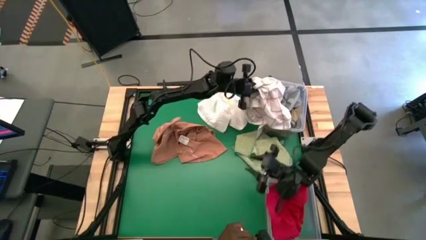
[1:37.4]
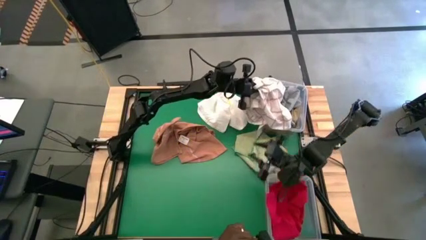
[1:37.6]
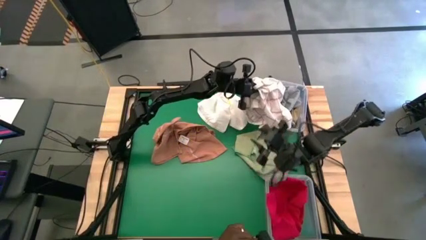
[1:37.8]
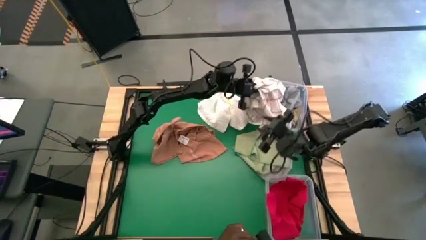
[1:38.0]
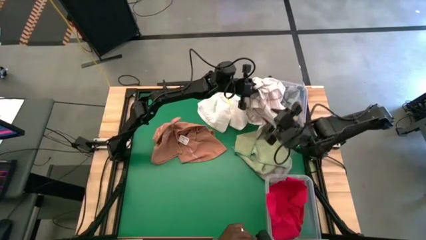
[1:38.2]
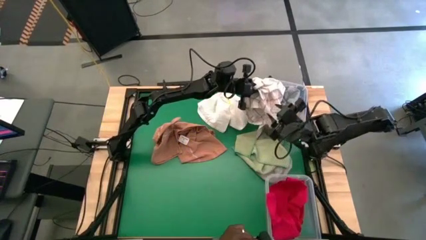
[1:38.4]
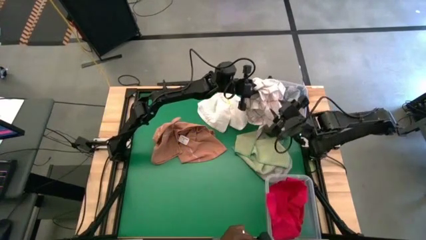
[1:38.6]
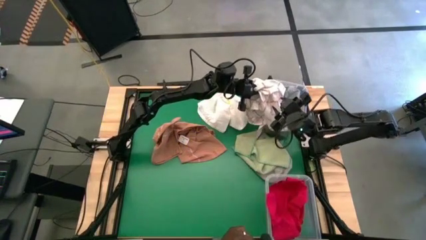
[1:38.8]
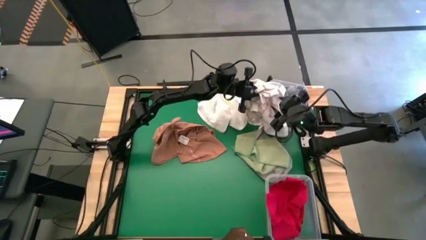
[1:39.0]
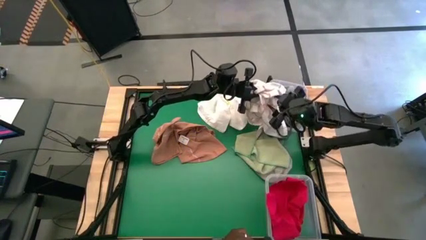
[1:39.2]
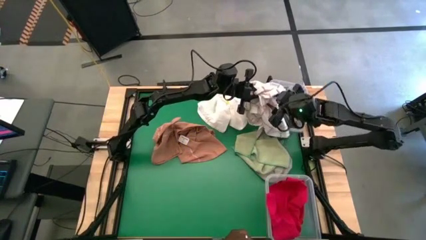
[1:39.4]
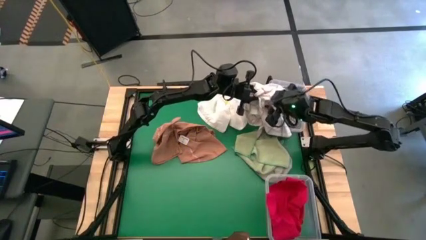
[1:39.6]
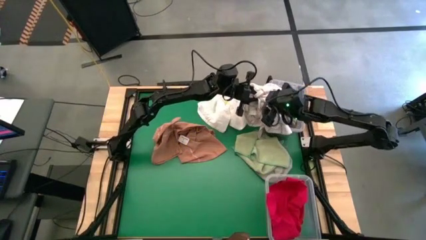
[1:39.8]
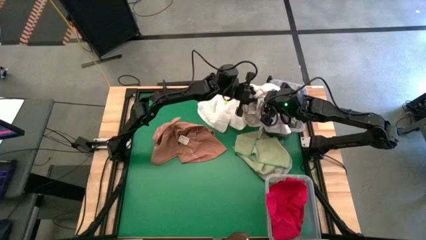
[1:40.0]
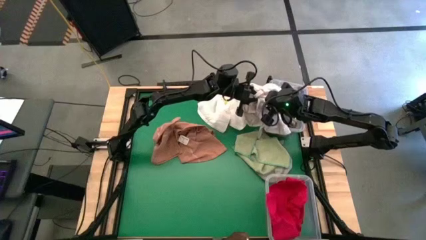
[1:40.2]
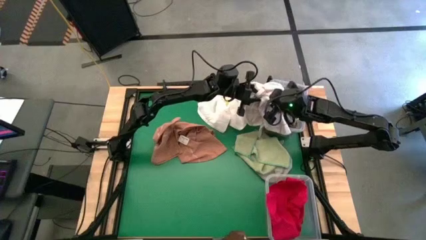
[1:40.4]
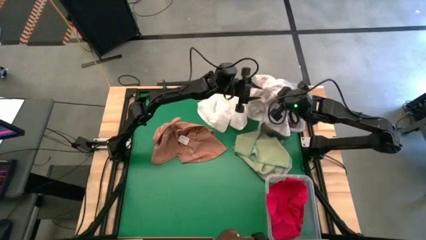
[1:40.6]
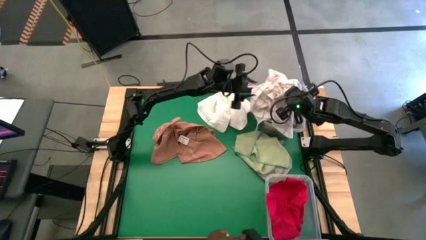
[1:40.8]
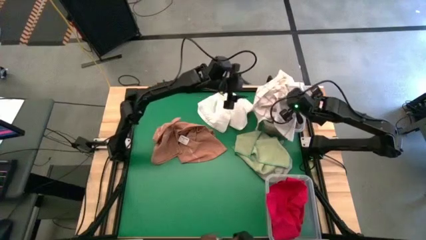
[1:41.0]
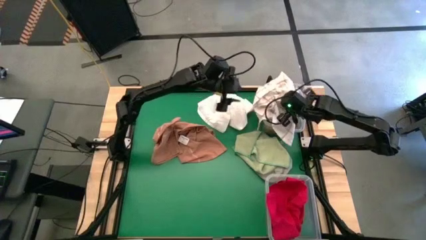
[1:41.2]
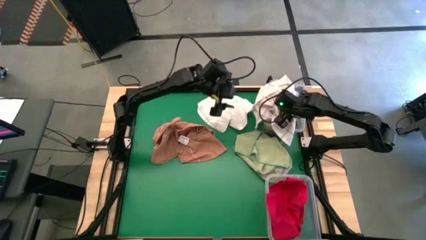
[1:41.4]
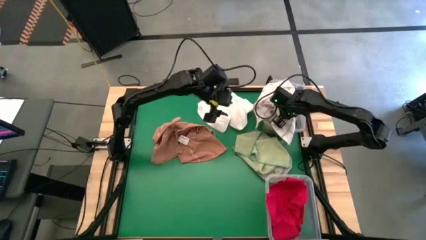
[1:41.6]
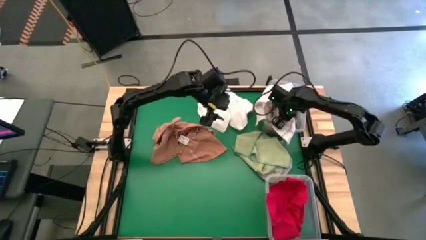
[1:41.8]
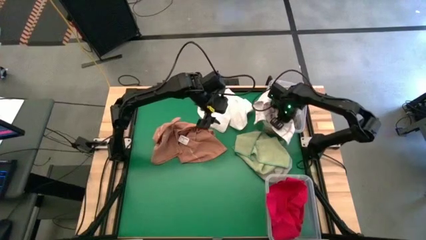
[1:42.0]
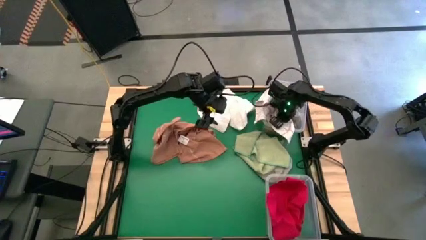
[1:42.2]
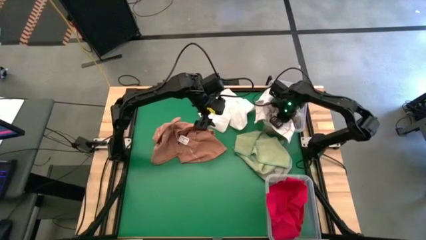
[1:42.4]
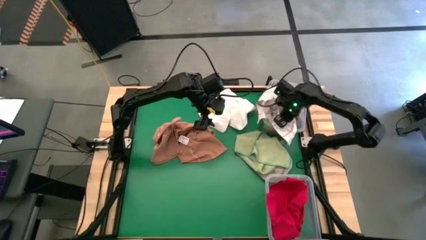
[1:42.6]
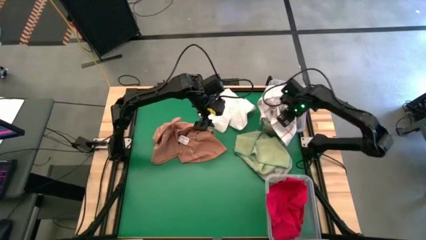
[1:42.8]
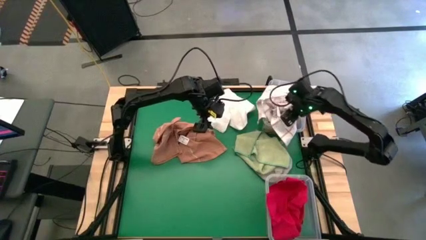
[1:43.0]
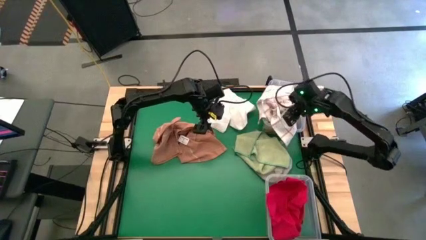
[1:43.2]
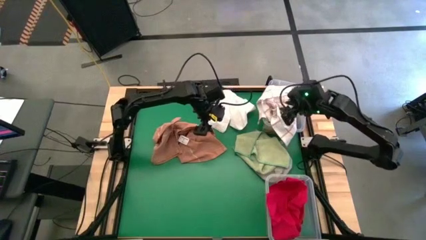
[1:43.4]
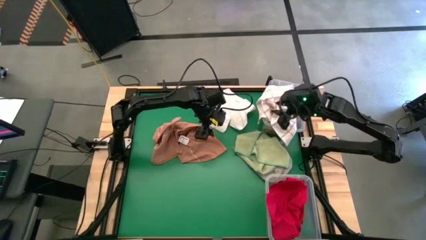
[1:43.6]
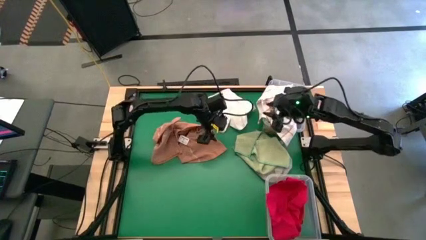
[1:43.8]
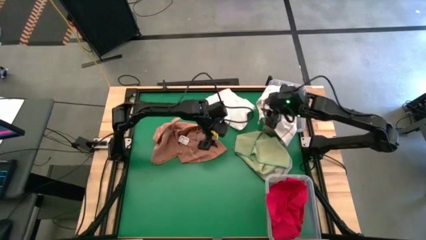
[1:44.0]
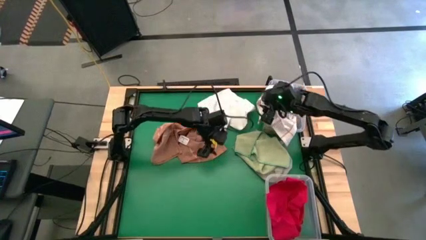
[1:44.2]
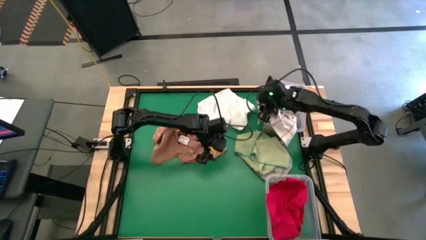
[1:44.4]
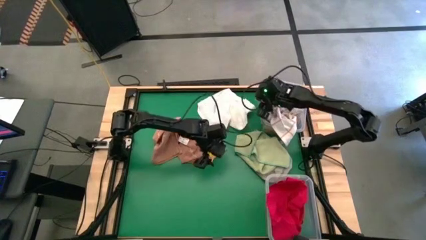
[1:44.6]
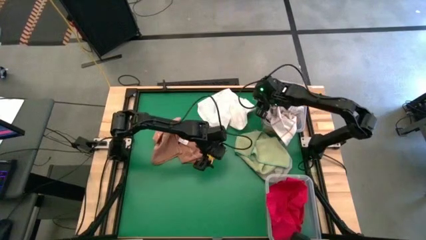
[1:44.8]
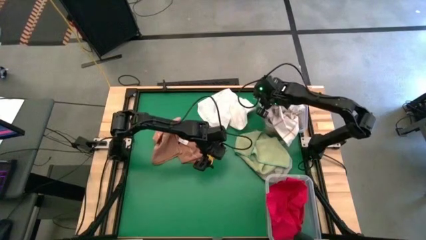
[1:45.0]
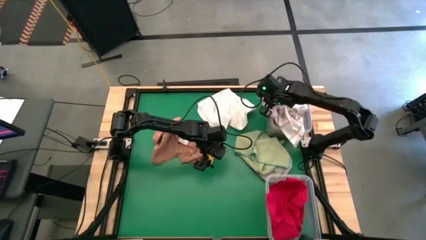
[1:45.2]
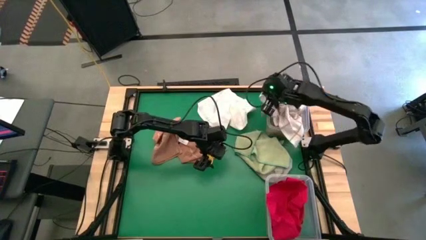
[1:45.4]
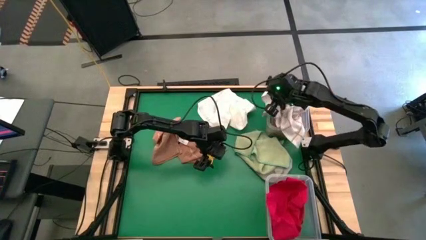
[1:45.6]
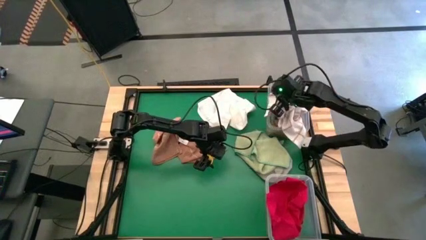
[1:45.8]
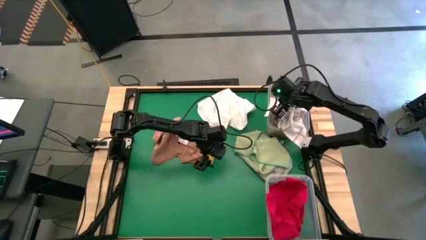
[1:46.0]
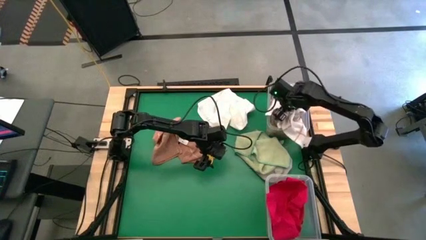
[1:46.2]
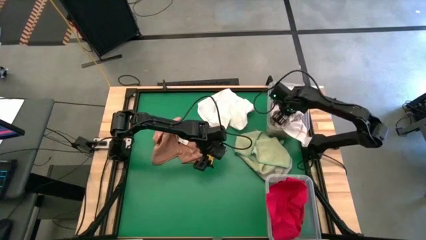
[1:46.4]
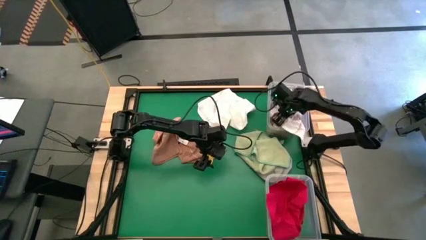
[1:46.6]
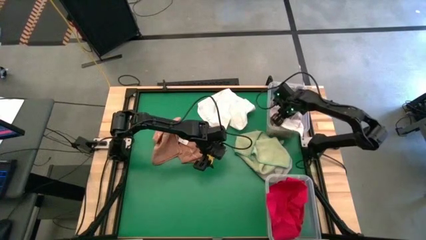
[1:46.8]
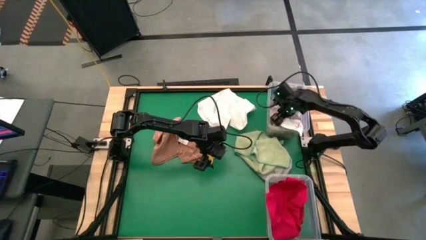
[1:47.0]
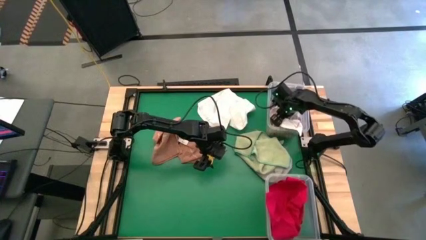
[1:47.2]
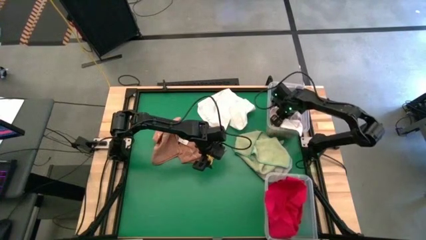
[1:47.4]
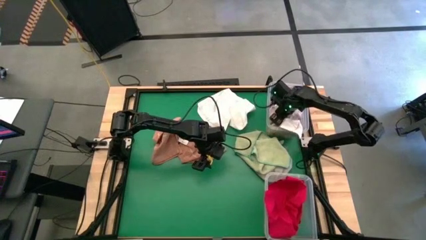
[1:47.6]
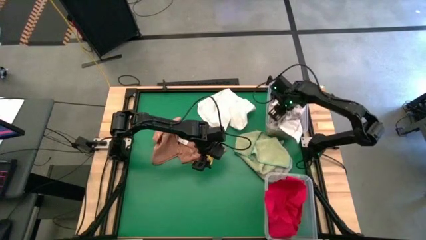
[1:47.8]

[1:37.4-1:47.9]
Task: Sort towels by color in basket
Put the patterned white towel into the top transparent bin

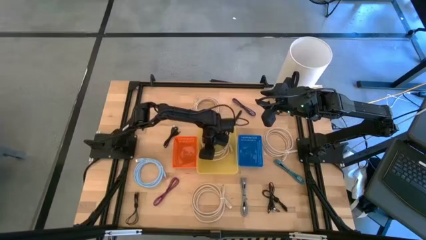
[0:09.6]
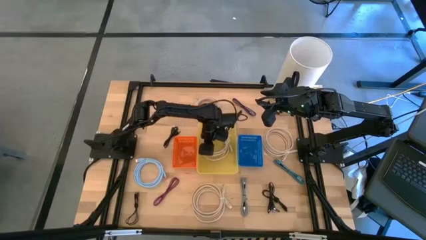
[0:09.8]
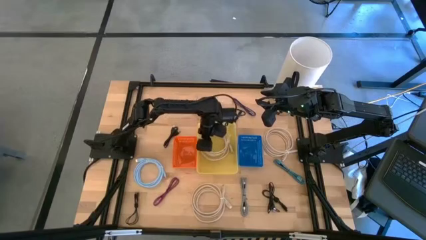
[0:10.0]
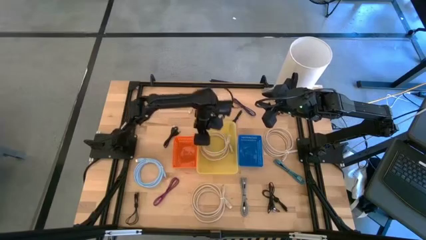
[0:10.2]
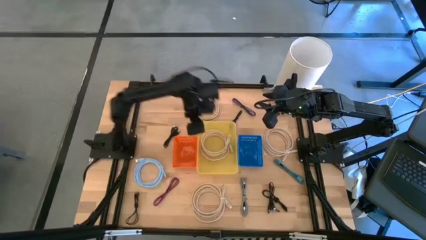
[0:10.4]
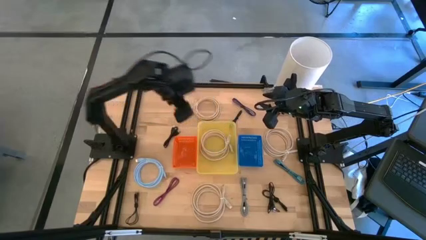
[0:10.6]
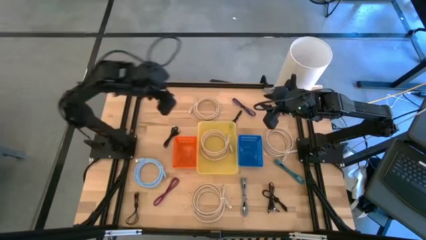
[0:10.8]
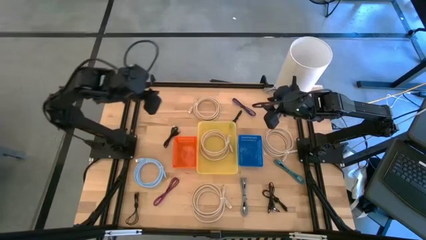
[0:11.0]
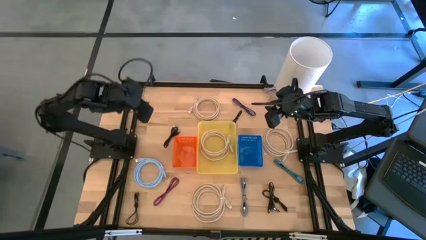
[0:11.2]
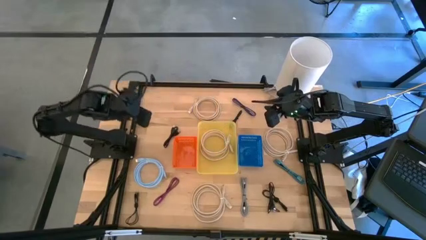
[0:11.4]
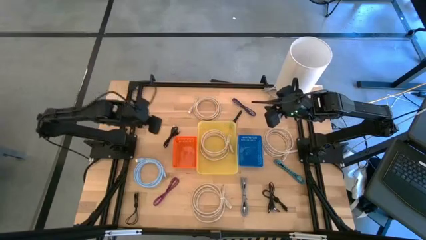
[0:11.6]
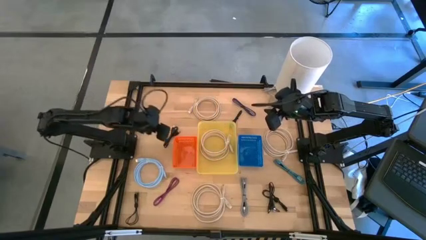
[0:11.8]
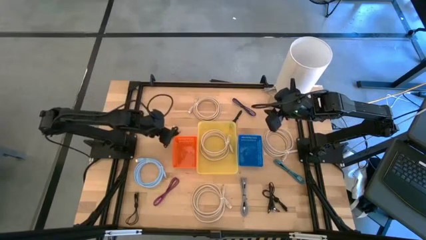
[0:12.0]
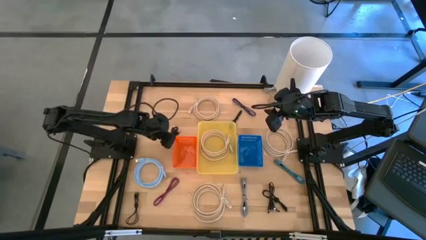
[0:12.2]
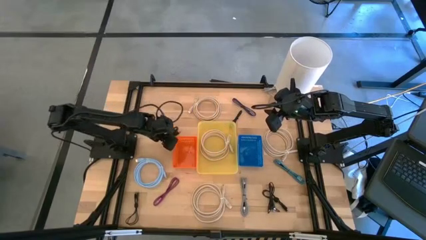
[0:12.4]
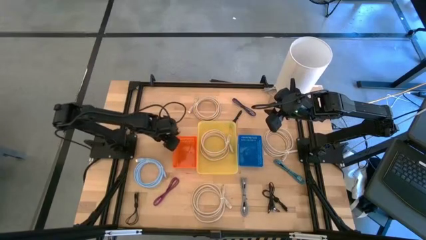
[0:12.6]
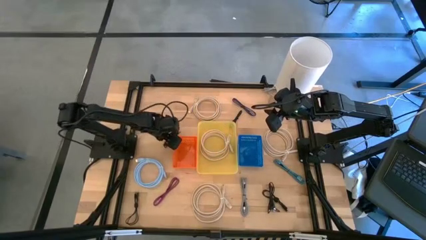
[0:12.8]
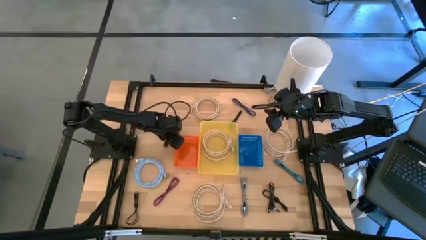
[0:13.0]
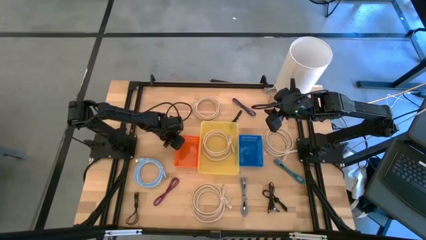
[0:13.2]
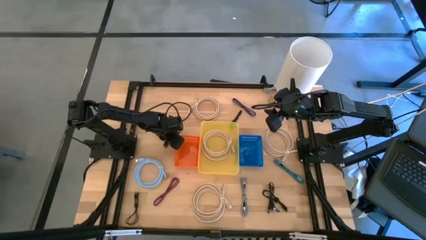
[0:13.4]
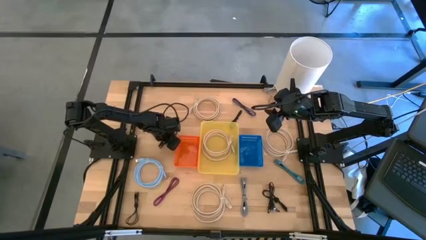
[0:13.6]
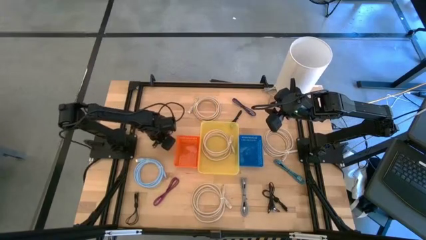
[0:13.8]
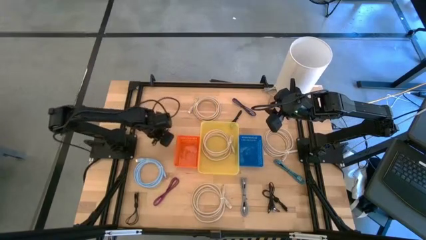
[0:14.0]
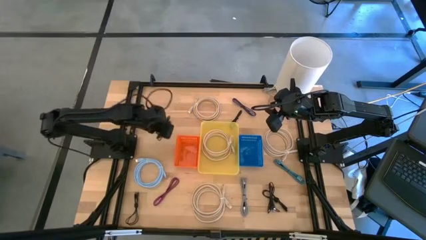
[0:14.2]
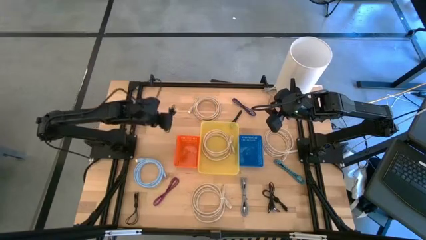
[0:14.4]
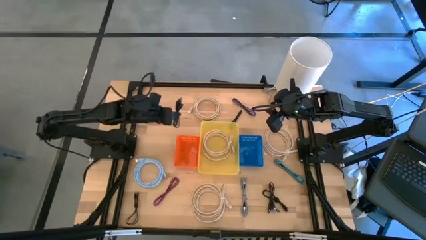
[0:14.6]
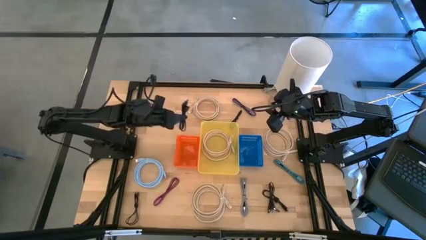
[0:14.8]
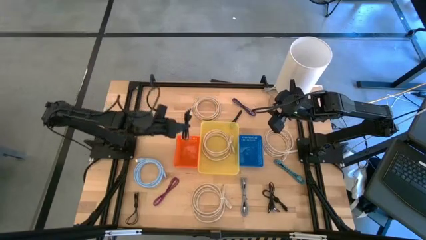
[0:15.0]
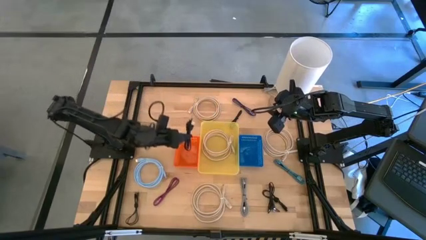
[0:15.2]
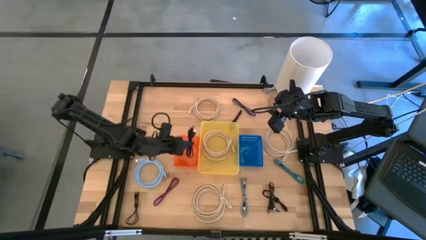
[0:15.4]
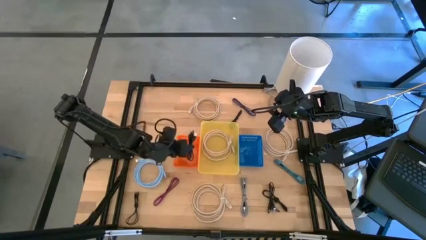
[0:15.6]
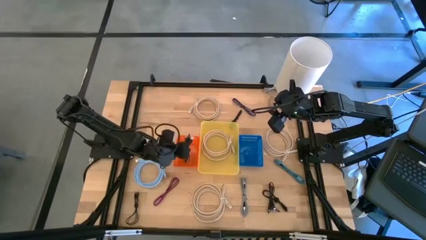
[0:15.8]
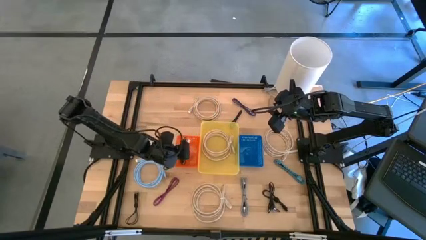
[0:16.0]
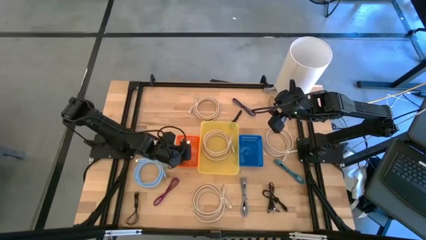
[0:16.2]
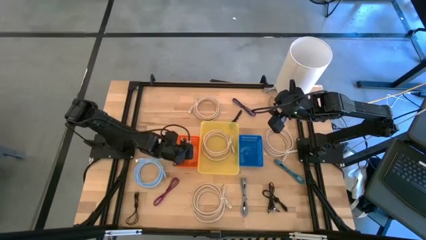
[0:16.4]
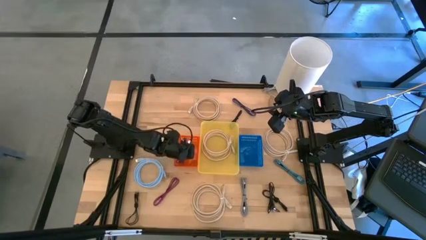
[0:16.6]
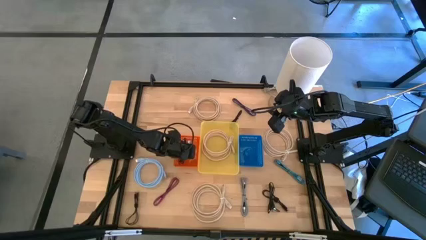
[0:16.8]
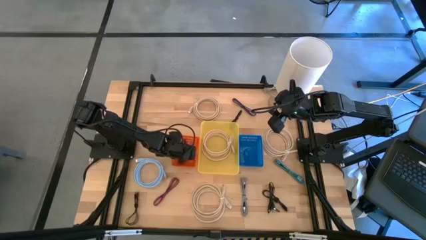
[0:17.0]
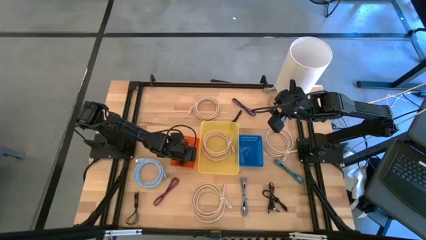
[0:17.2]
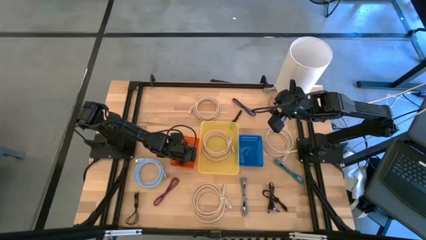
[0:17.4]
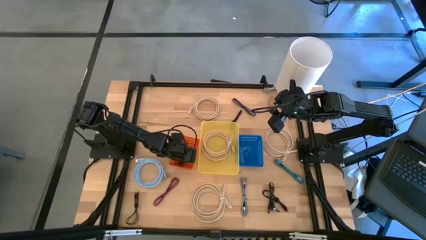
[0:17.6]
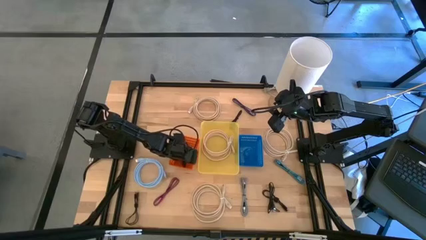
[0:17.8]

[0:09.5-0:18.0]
Task: Pick & Place USB Port
Put the black usb cable into the orange bin
